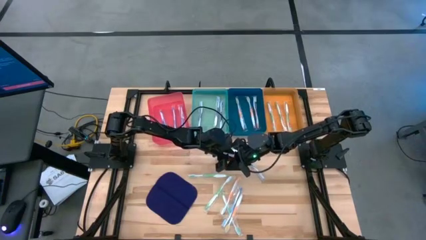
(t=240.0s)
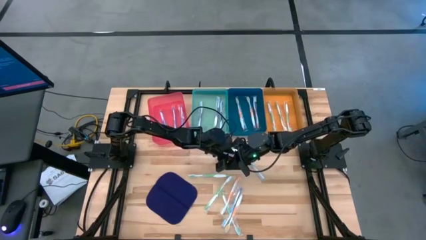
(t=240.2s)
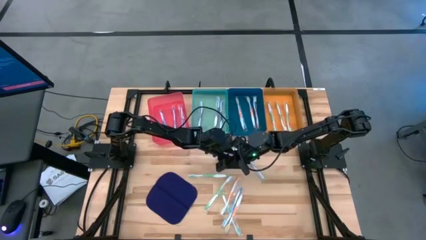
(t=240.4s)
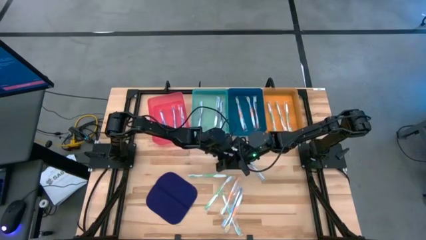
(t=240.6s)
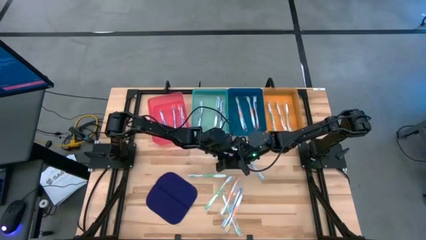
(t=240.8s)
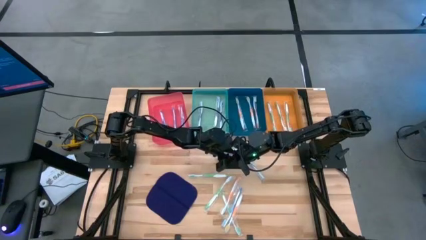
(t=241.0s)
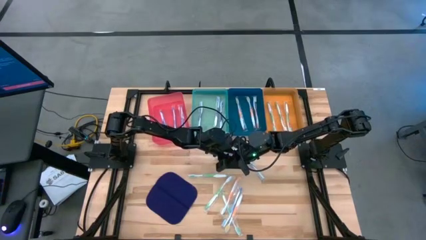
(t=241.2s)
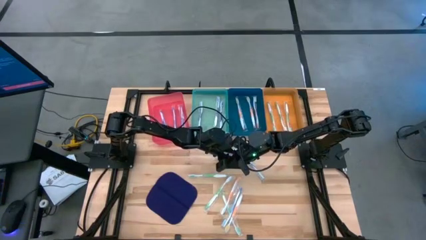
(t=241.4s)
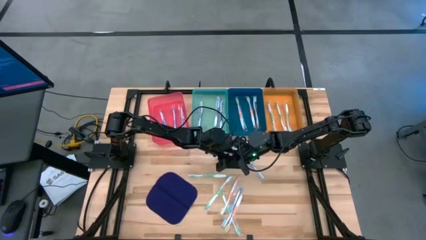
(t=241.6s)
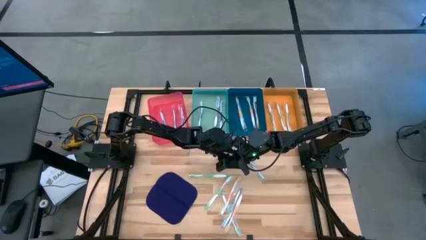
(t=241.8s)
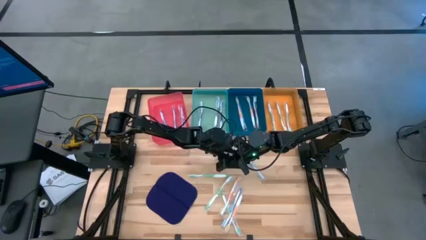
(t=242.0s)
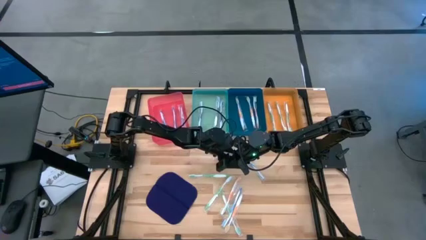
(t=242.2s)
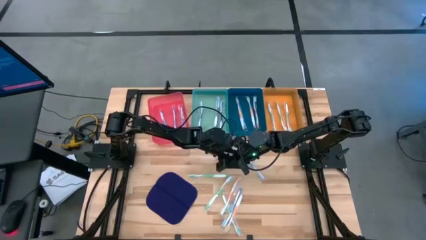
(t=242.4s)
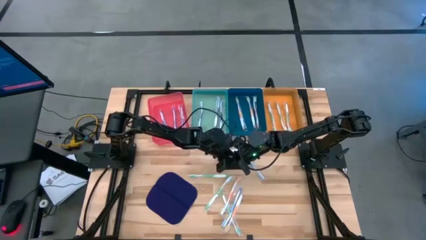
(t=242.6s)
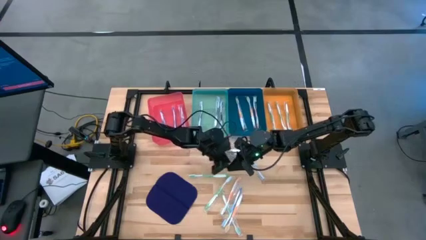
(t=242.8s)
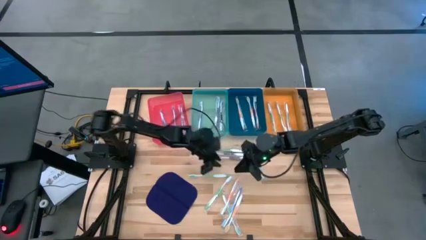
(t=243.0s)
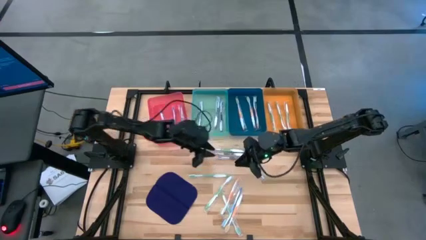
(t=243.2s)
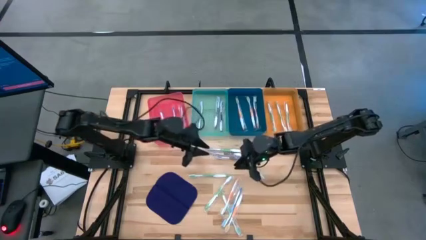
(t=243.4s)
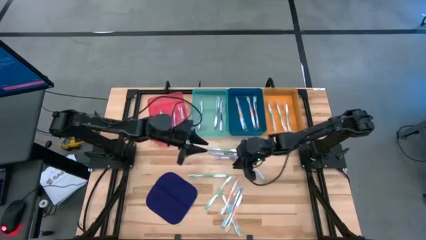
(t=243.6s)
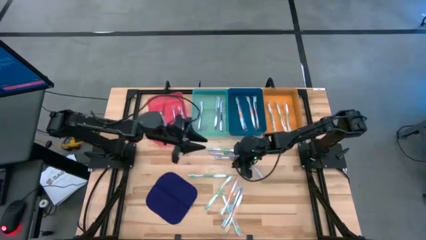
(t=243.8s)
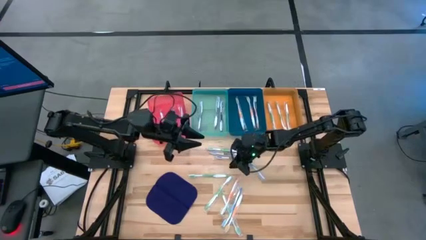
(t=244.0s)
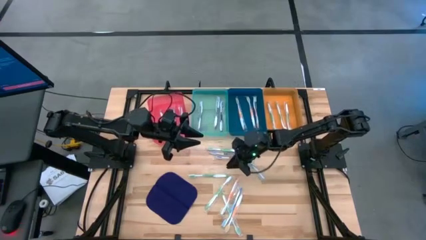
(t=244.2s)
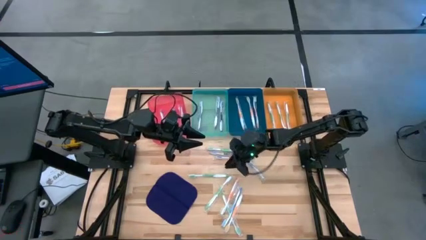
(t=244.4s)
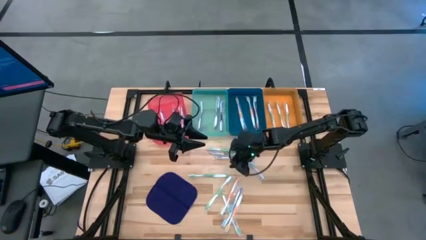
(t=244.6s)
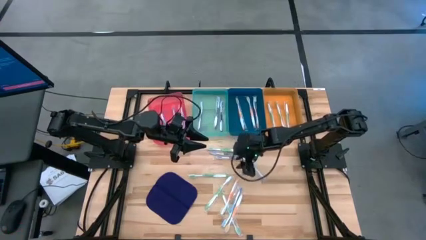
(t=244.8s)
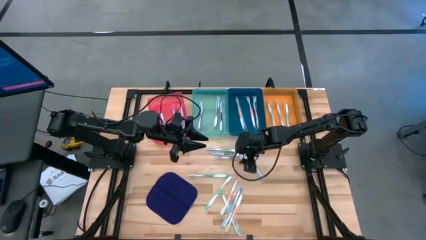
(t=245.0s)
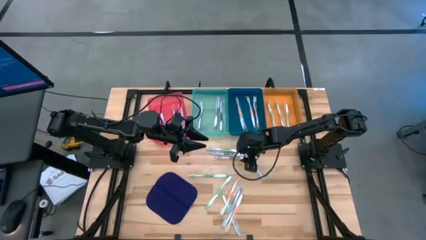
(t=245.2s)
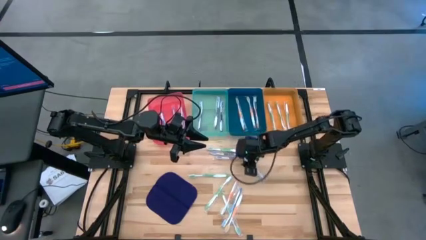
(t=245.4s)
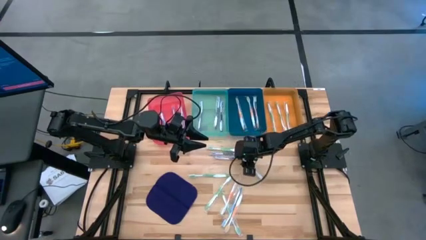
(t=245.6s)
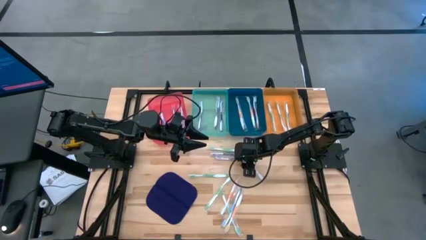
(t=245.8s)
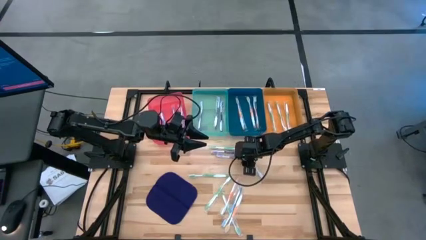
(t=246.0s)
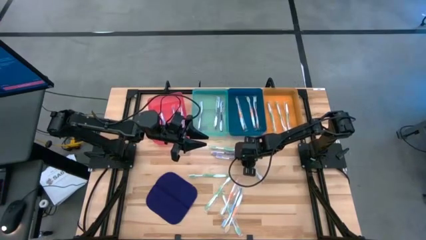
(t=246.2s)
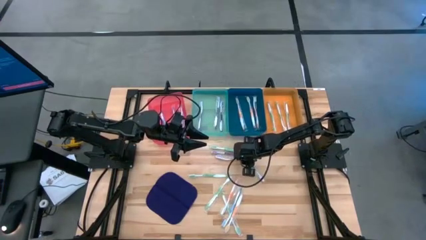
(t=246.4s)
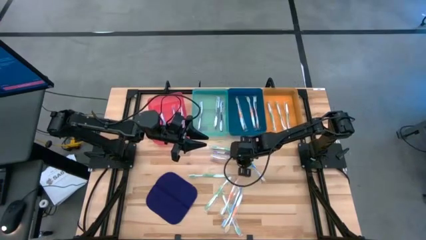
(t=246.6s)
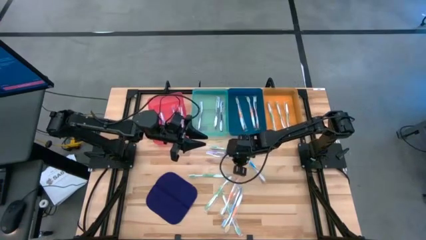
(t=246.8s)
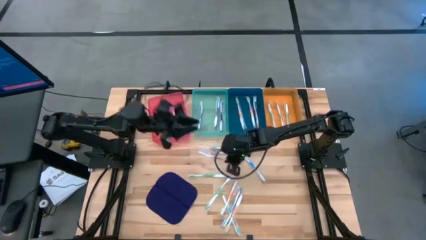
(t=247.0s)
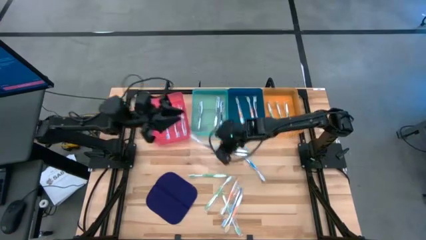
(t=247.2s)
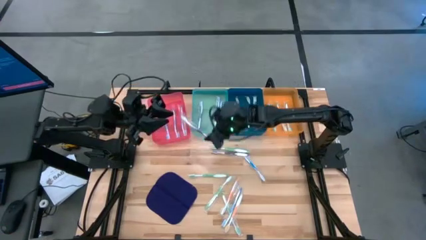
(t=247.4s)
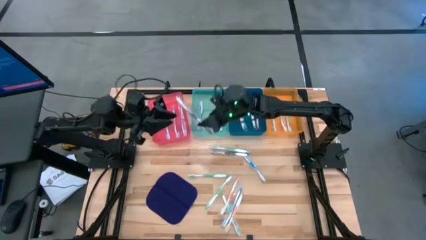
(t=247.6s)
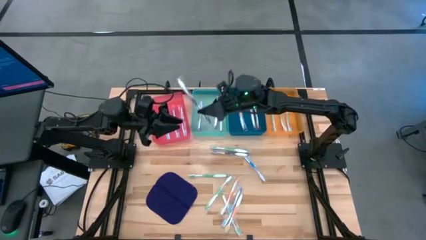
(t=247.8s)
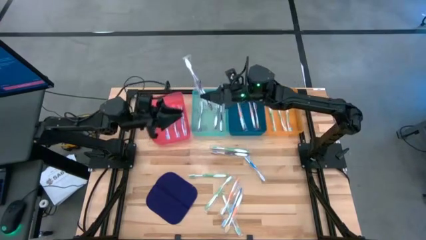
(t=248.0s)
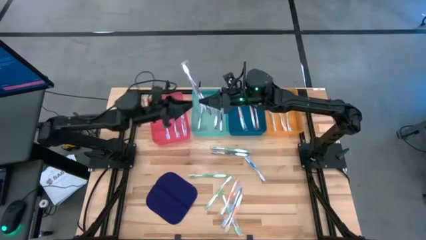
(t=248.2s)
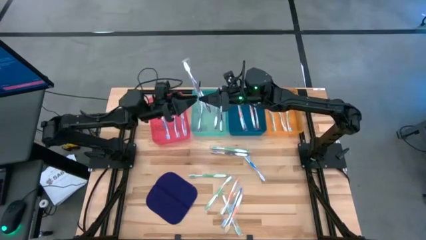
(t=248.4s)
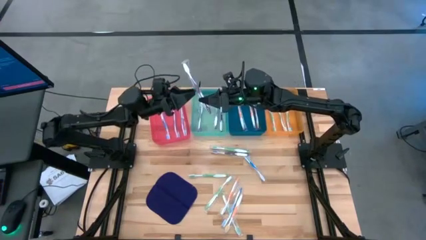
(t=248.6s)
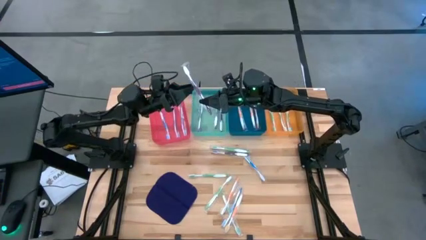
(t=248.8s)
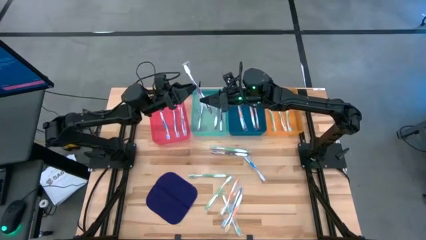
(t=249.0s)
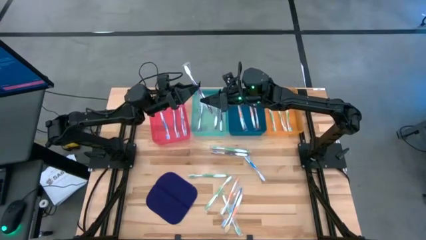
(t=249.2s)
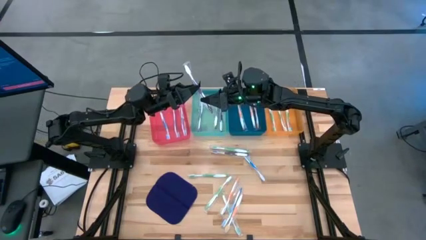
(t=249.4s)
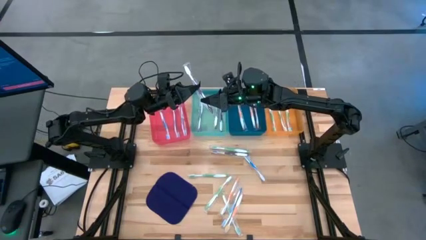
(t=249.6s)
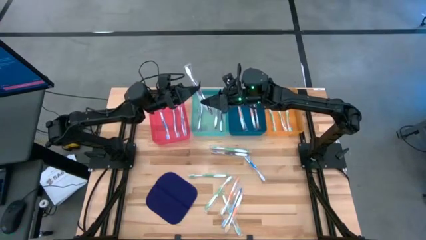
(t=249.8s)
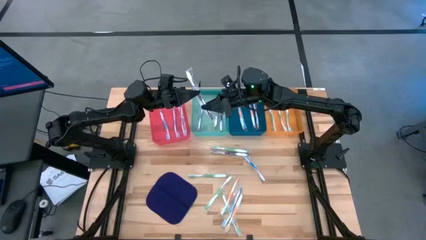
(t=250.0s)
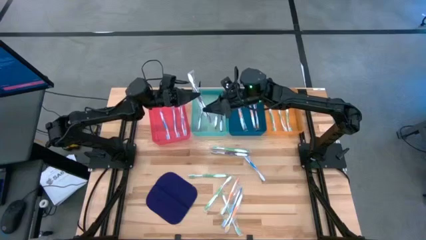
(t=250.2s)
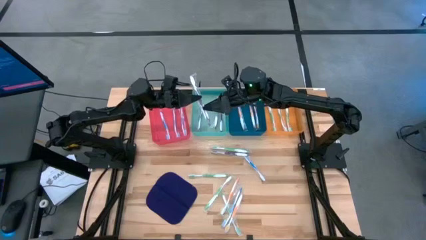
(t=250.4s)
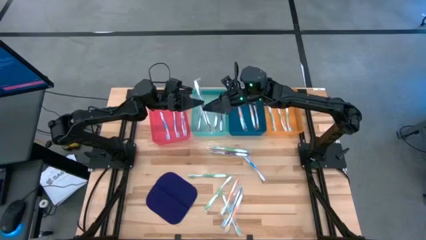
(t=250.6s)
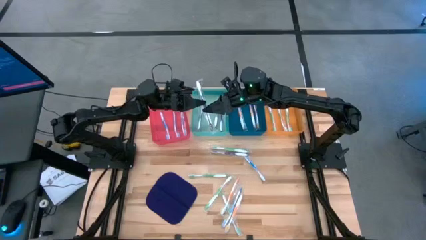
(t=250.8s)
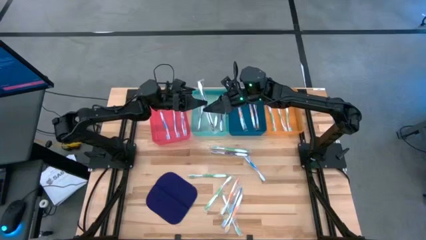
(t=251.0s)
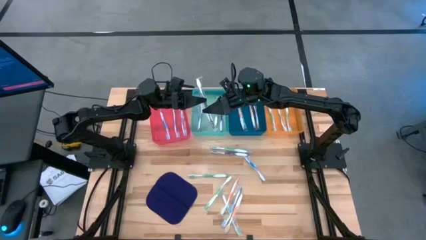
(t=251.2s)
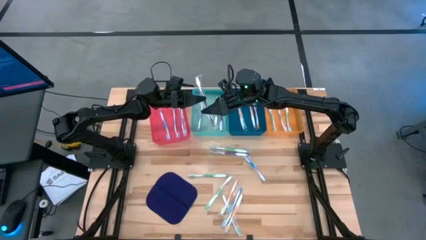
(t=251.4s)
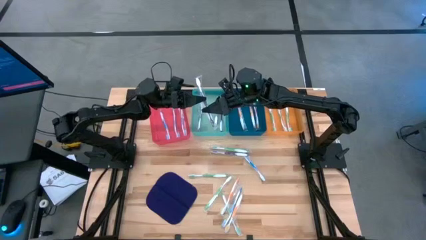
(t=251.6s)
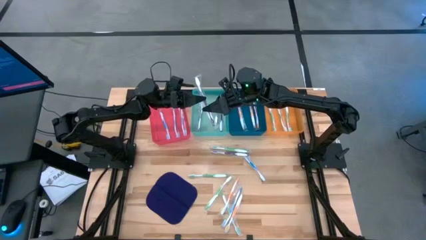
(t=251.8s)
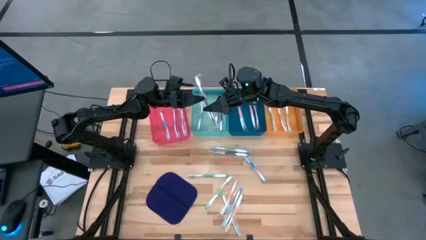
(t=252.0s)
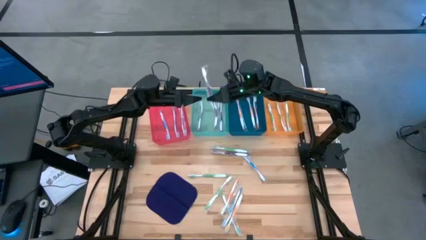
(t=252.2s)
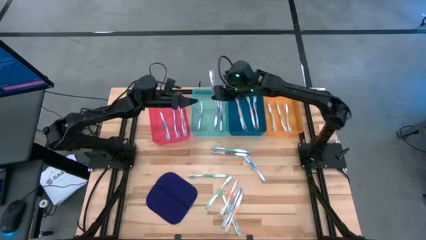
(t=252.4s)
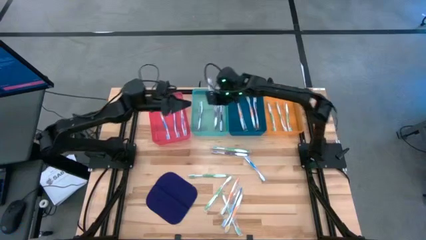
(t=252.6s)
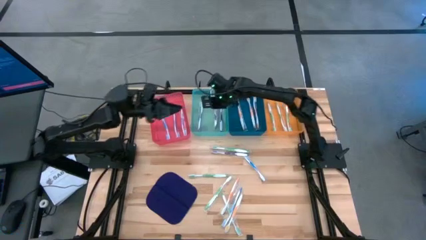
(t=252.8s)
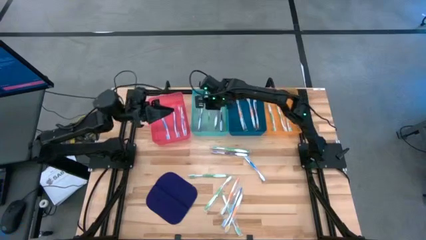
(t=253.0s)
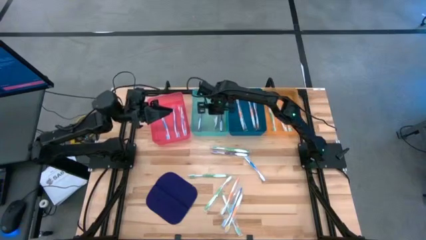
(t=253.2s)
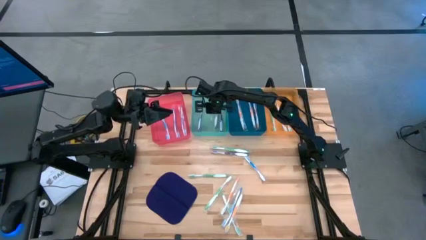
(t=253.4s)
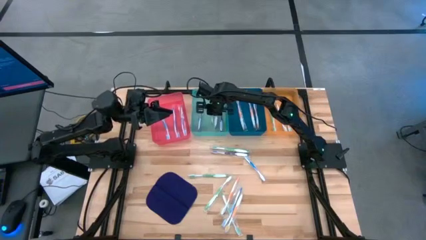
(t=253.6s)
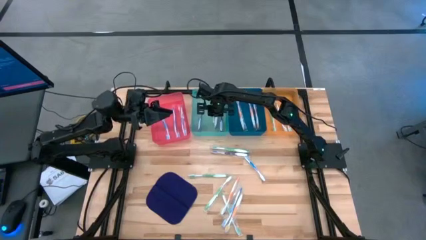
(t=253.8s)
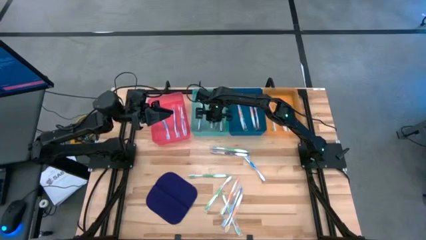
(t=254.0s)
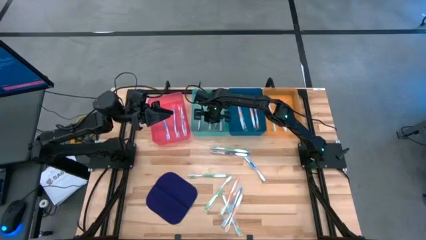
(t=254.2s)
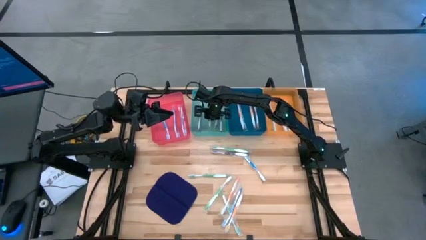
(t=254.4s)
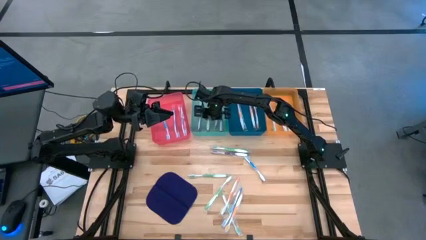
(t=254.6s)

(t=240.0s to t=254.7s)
Task: Pick & Place Toothbrushes
Put the purple toothbrush into the green bin

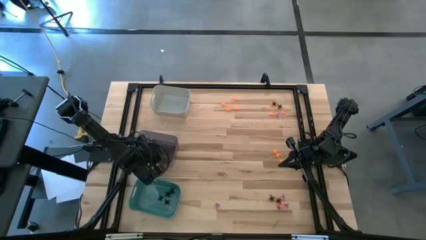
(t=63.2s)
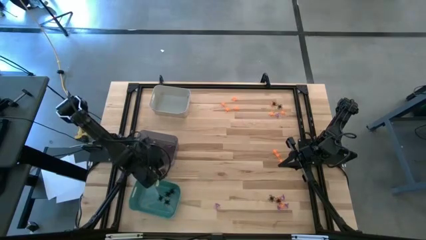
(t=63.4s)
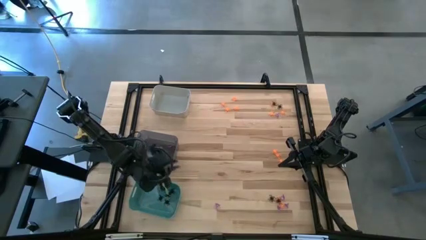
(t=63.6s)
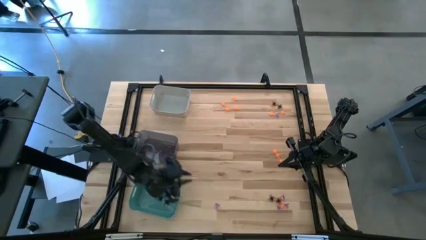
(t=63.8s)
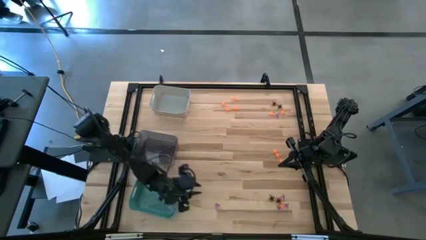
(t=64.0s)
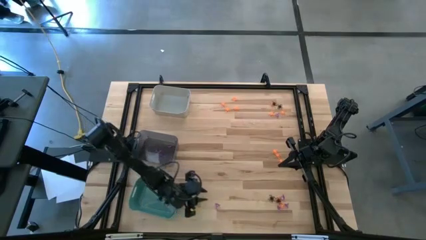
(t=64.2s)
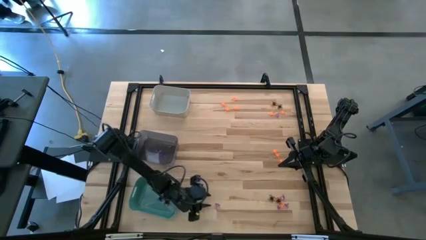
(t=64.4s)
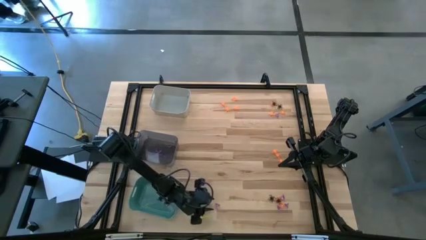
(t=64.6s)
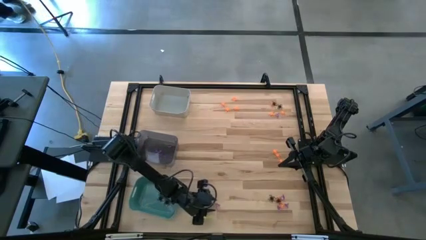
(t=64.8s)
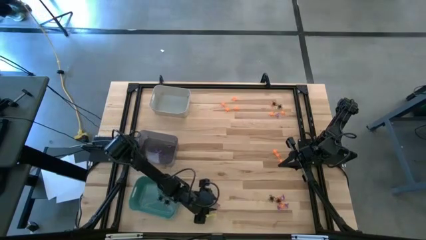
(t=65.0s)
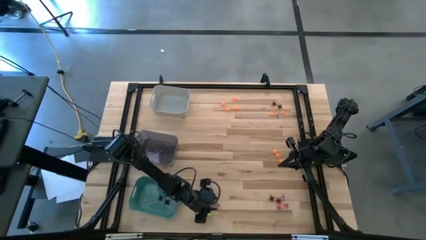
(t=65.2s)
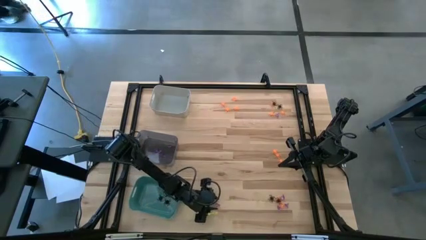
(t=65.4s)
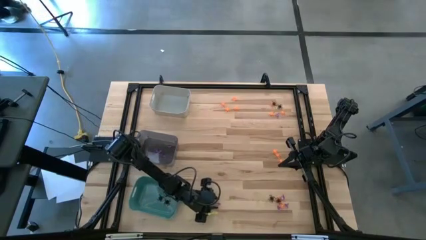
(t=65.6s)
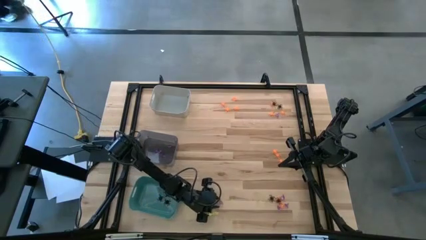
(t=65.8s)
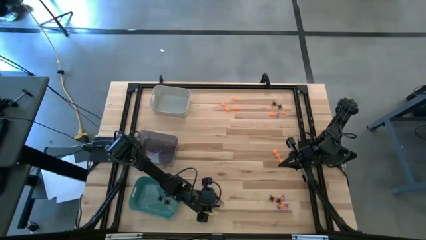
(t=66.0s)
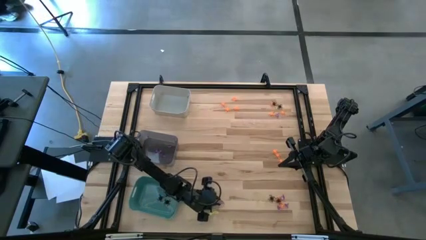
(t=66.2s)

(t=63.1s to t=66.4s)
Task: Sort Halloween decoration
Put the bottom center violet witch hat into the black bin
